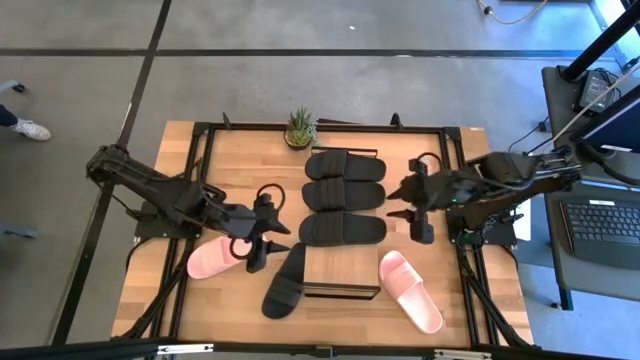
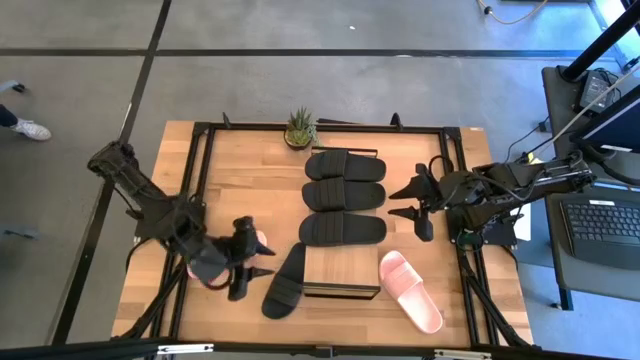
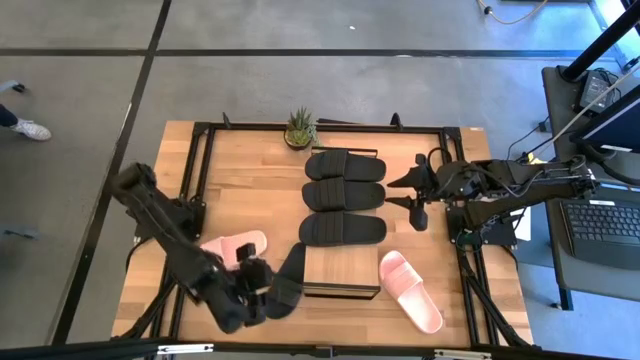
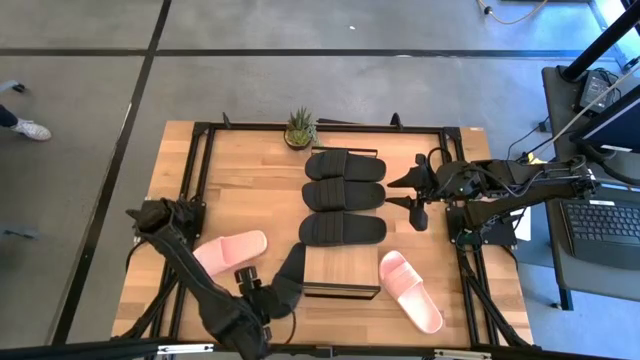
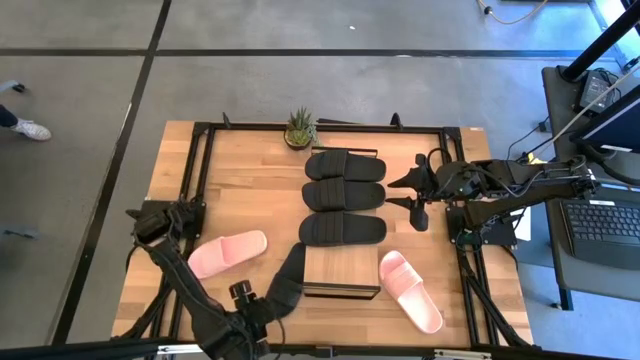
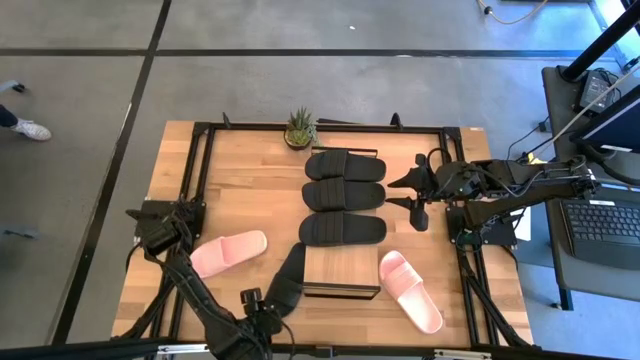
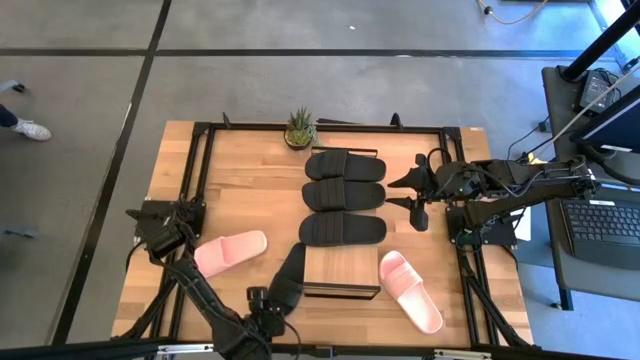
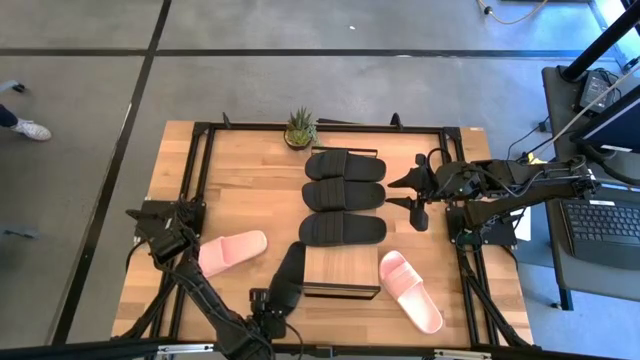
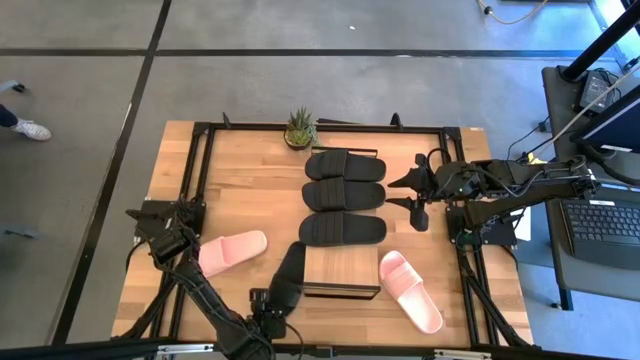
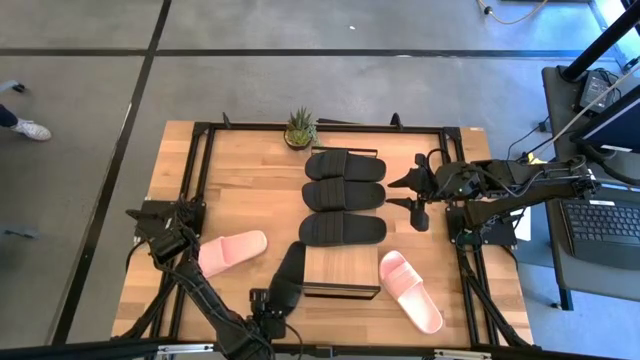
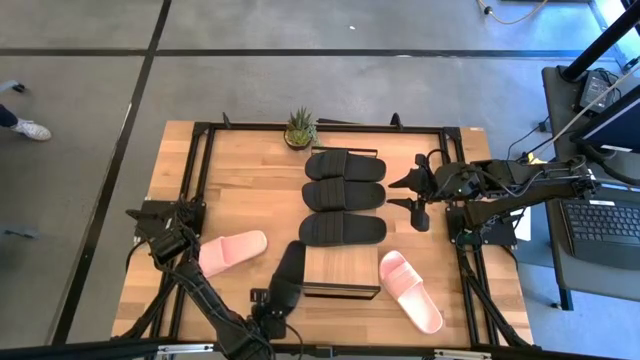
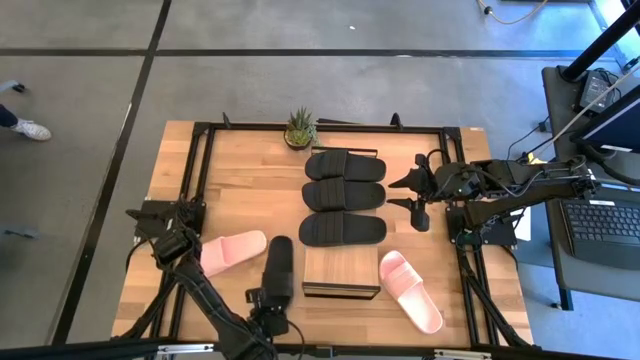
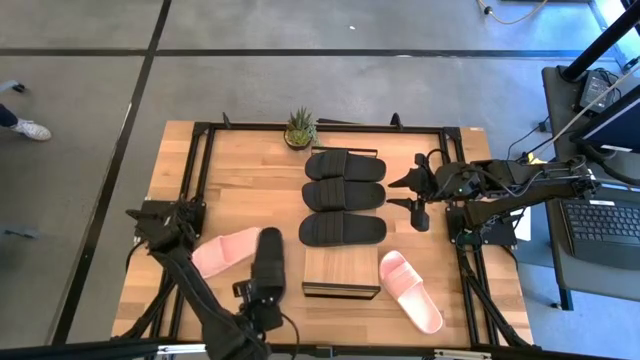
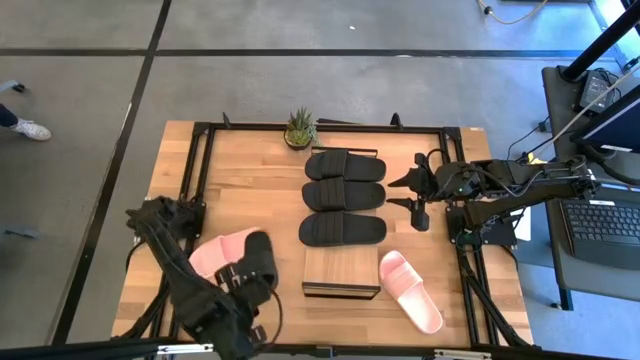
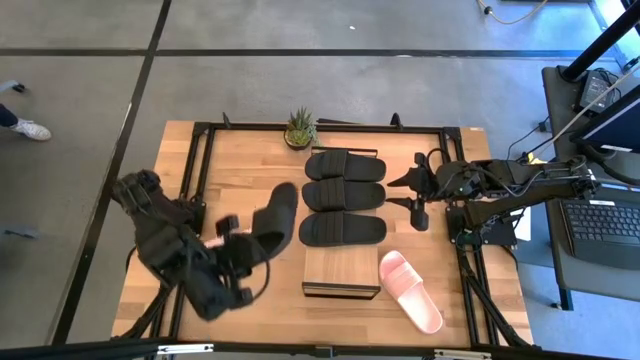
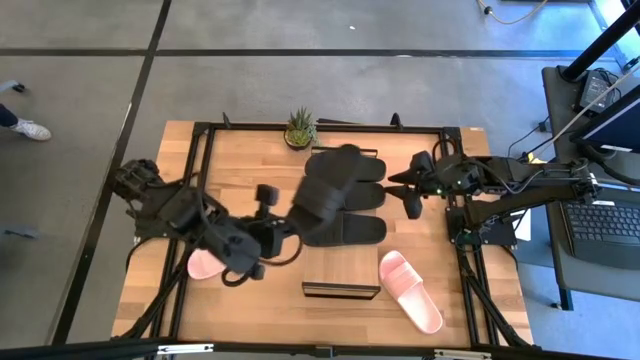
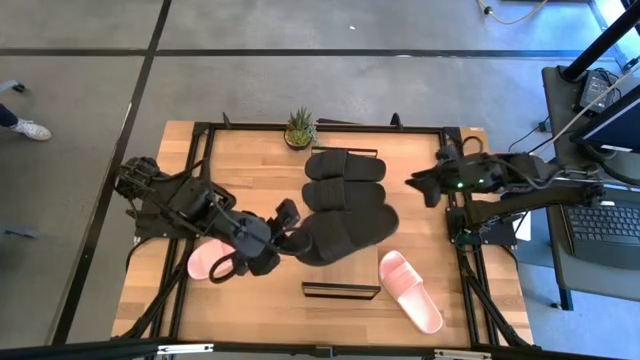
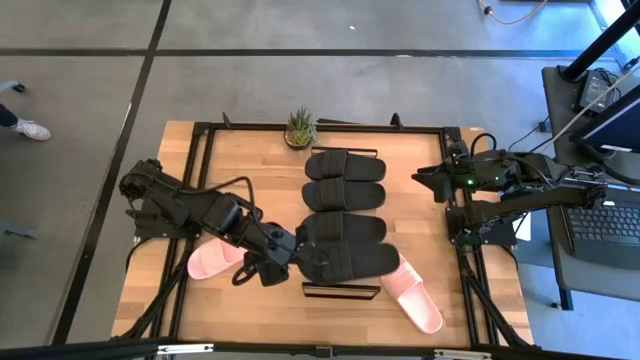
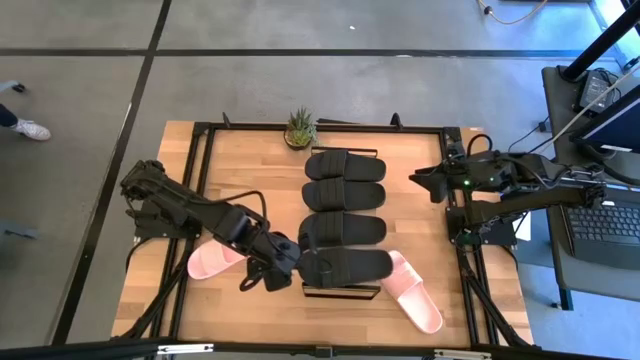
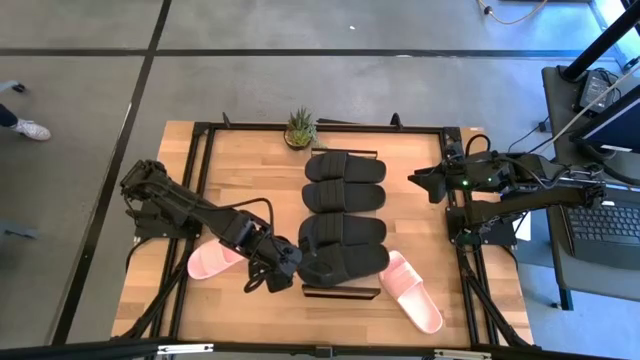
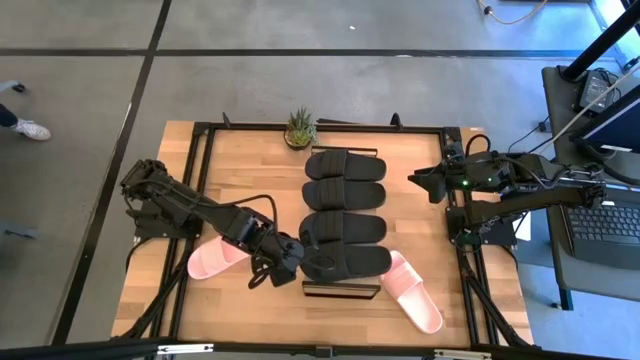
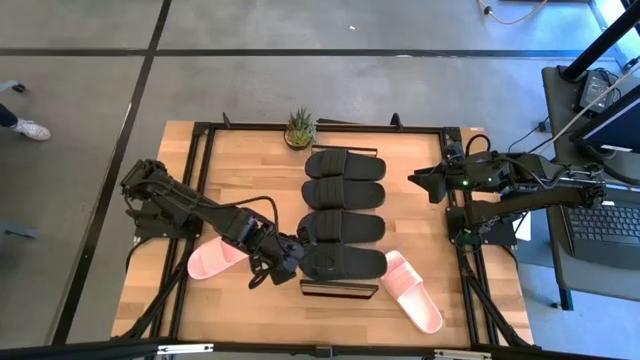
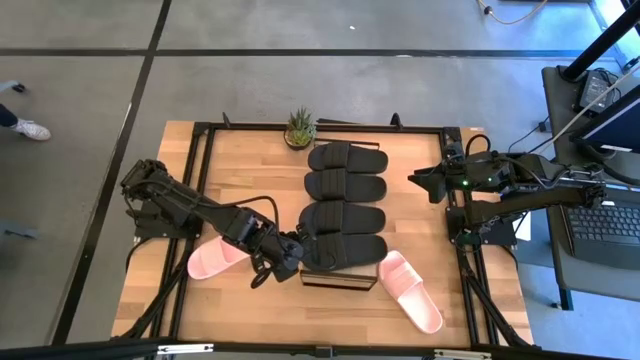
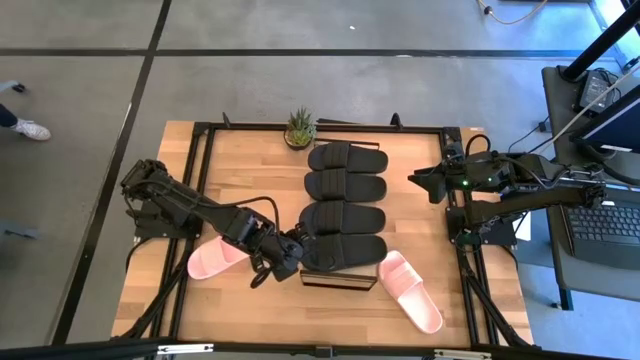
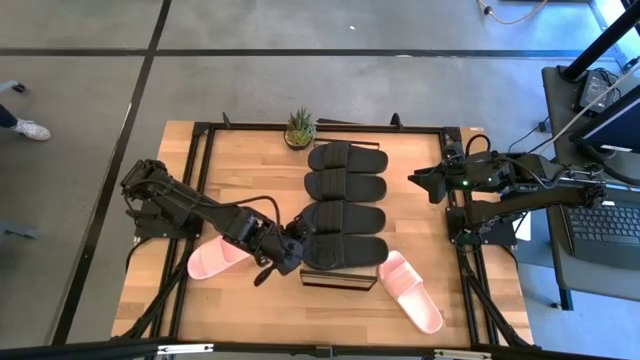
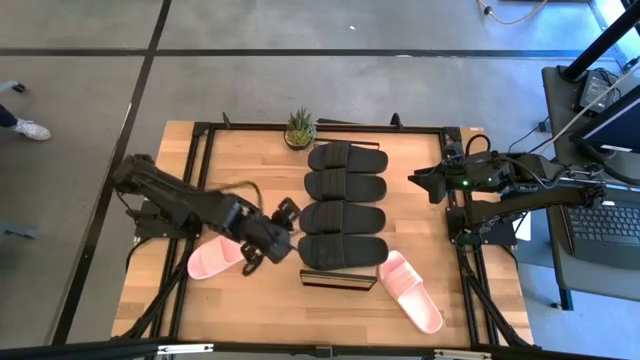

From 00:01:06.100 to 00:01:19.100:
Task: Pick and place slides into the shelf
Put the black slipper on the shelf

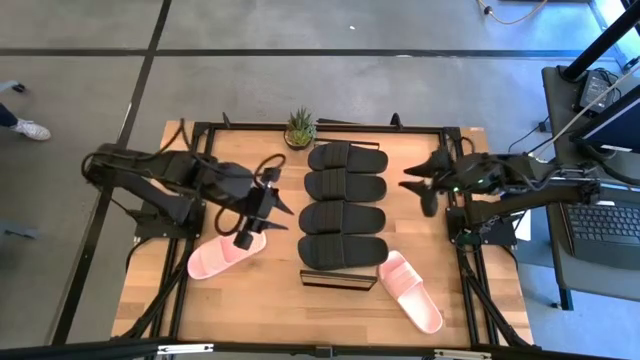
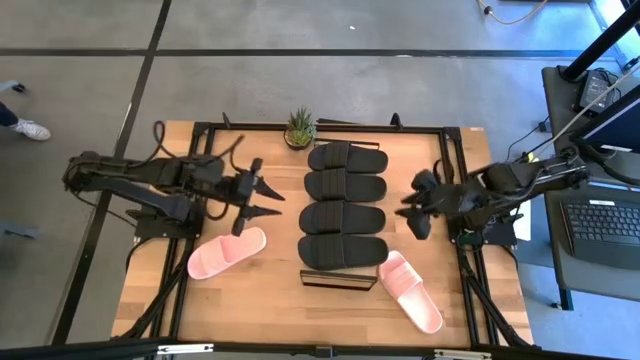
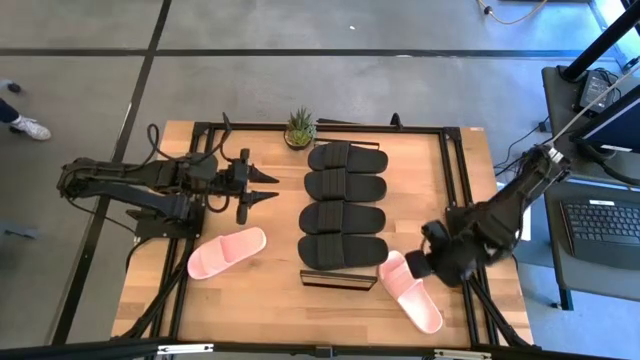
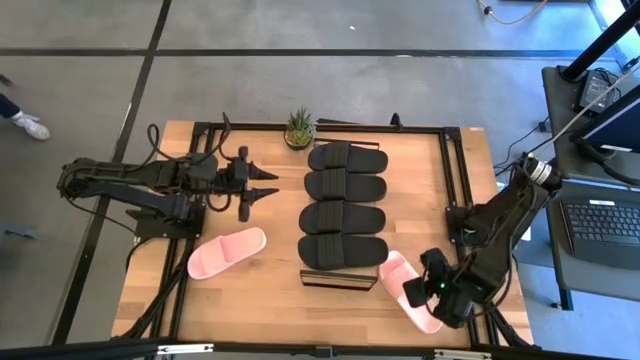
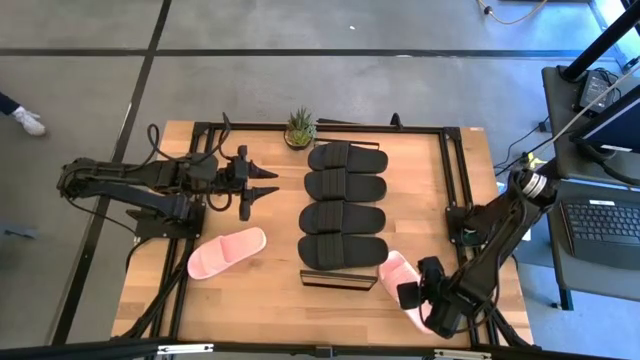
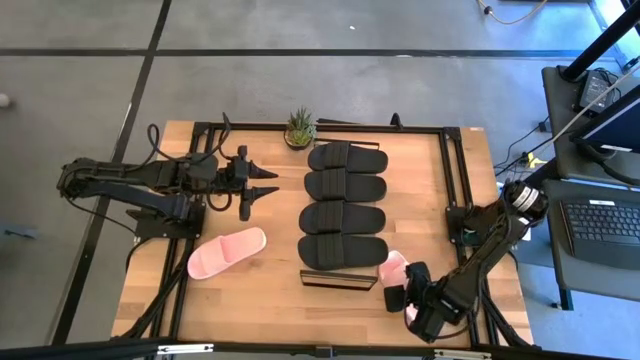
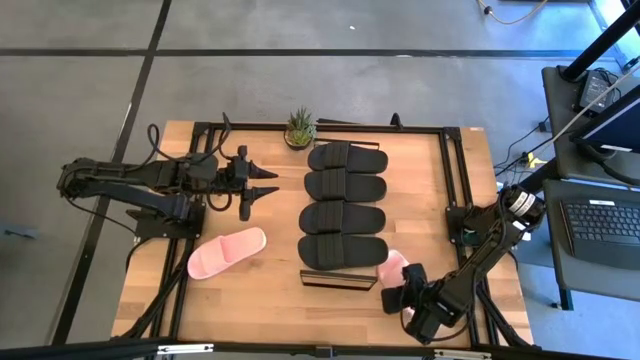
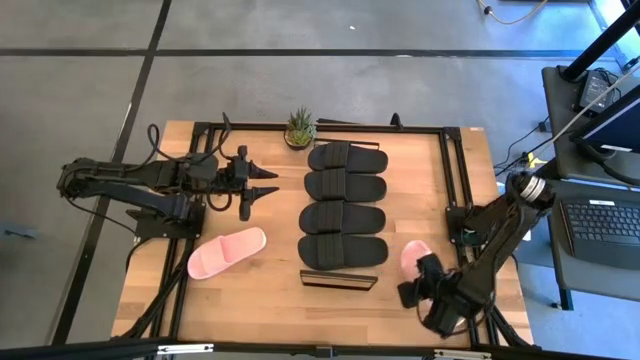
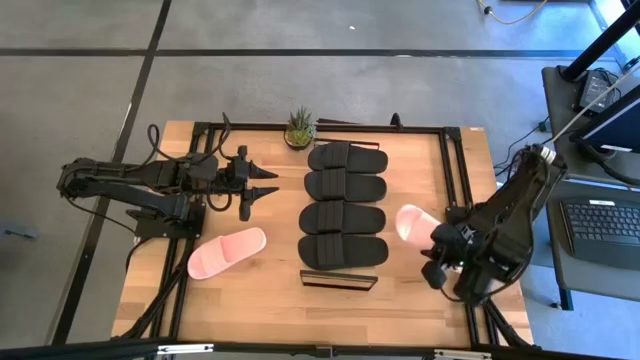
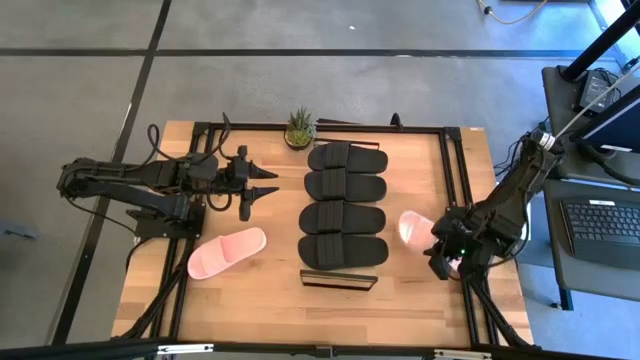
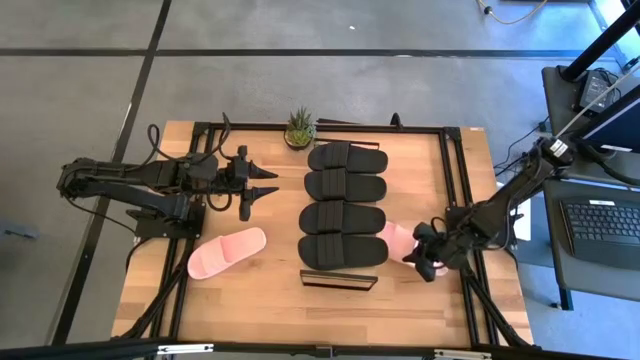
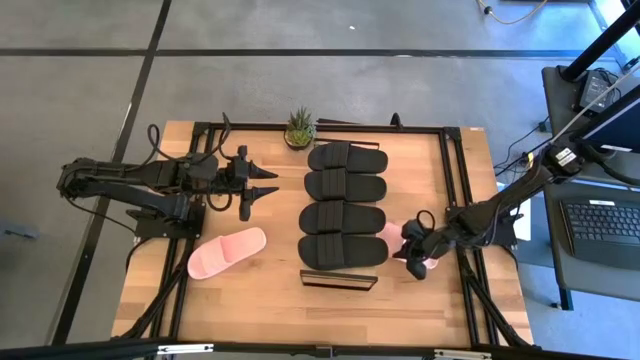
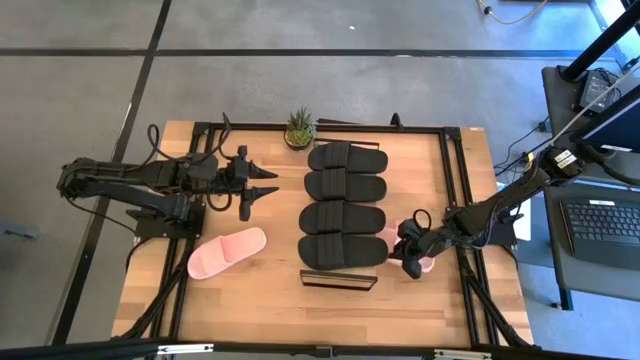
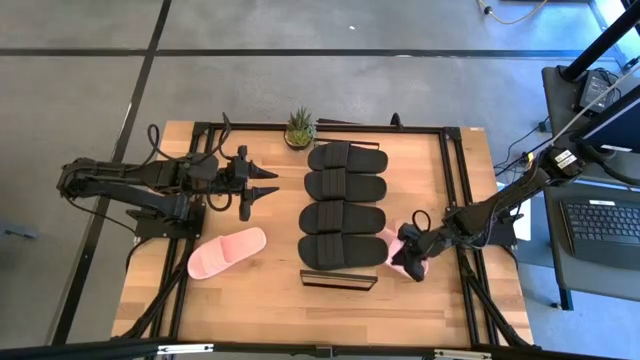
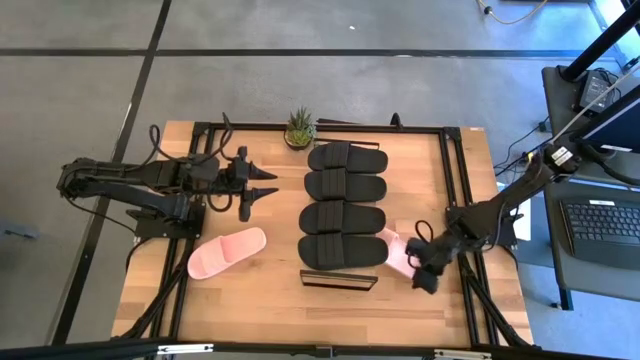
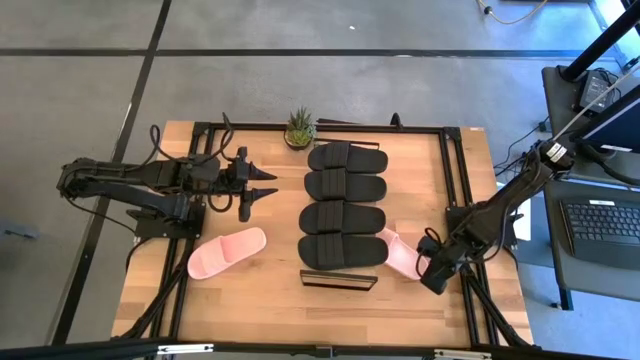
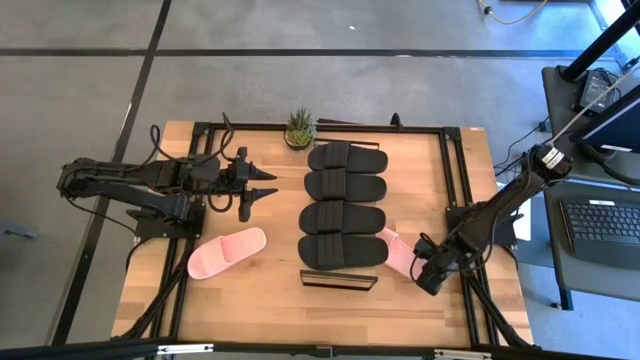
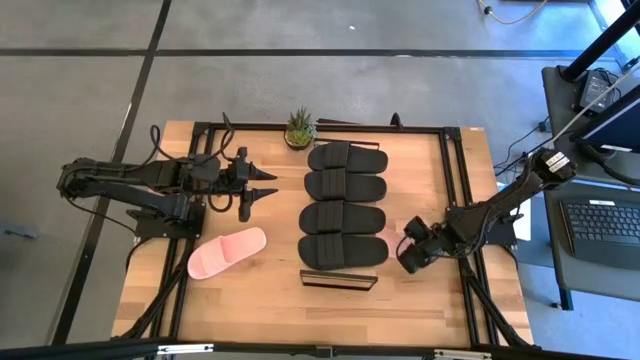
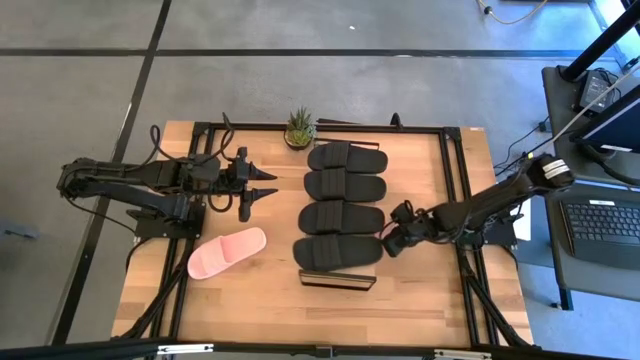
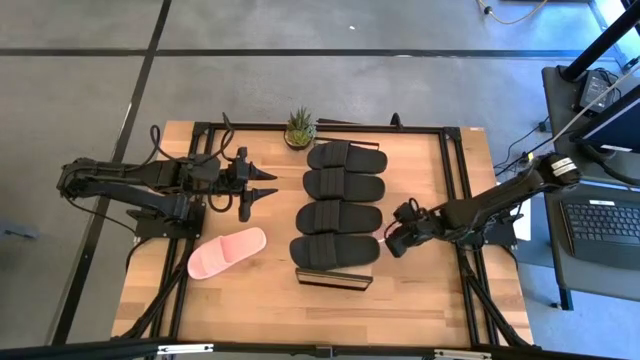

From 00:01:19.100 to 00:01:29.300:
Put the right pink slipper under the shelf
